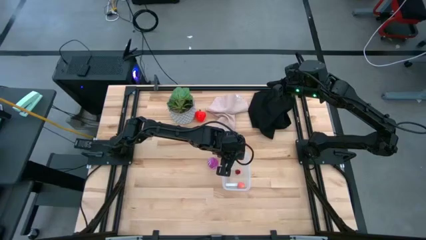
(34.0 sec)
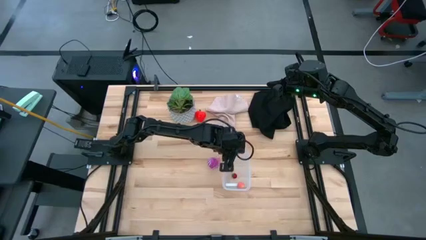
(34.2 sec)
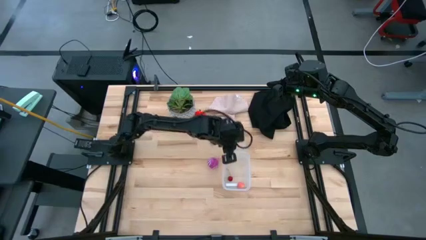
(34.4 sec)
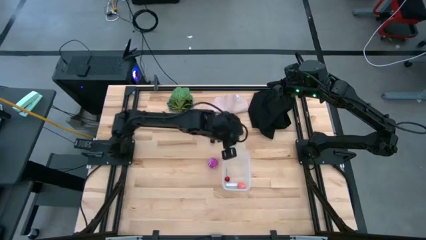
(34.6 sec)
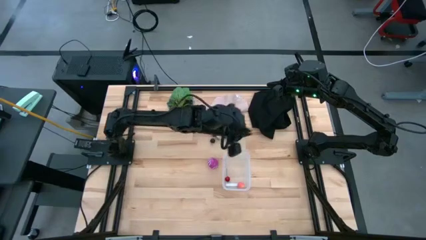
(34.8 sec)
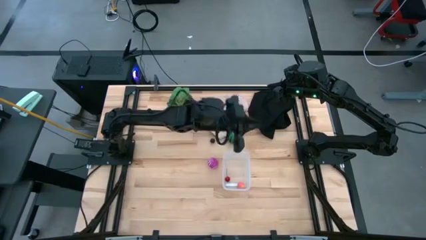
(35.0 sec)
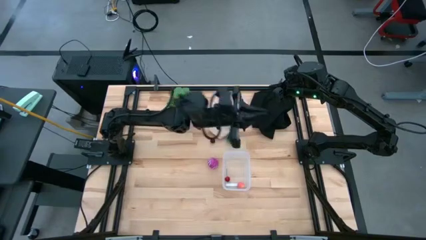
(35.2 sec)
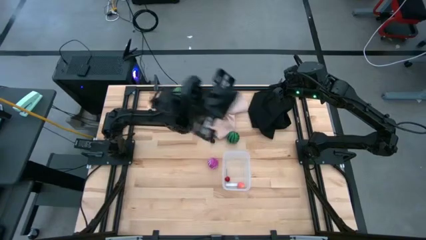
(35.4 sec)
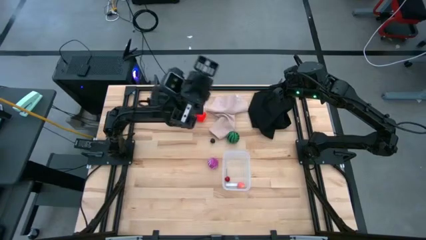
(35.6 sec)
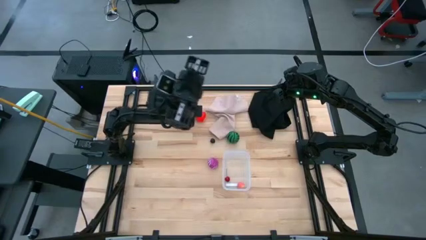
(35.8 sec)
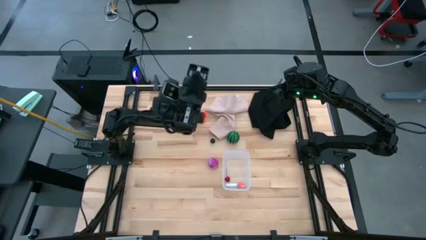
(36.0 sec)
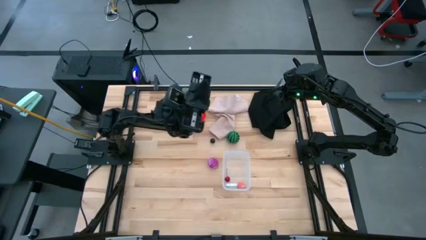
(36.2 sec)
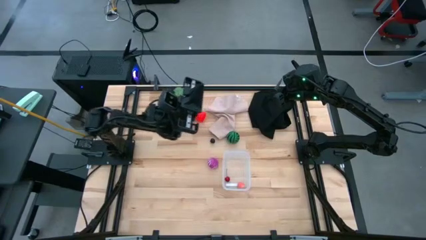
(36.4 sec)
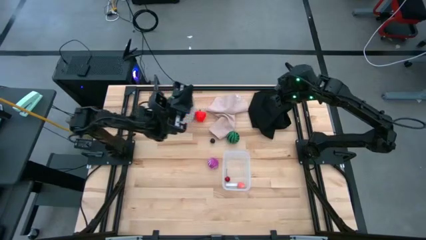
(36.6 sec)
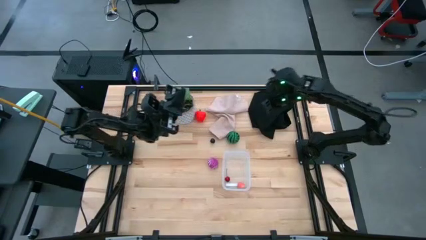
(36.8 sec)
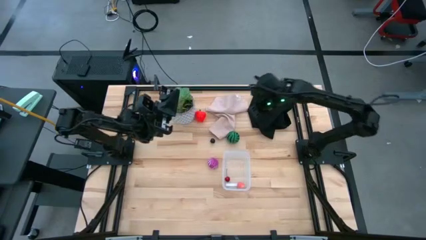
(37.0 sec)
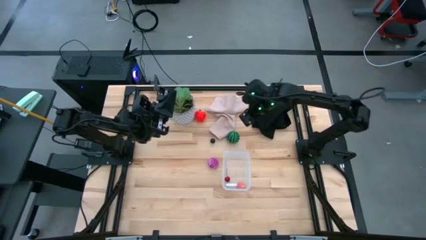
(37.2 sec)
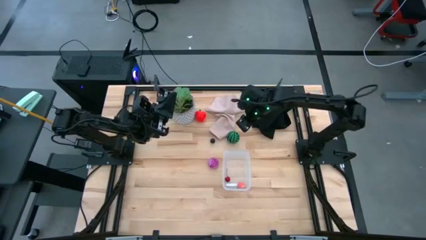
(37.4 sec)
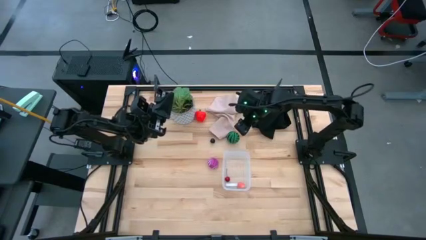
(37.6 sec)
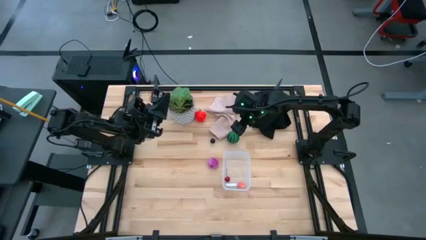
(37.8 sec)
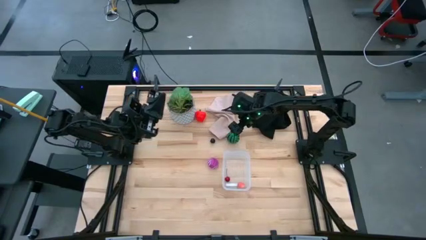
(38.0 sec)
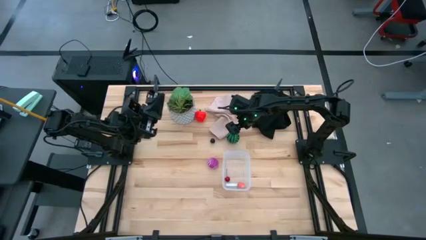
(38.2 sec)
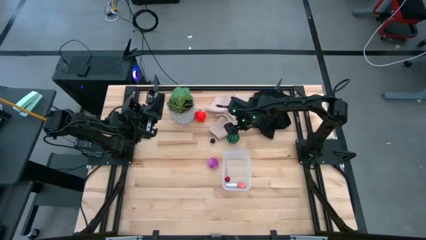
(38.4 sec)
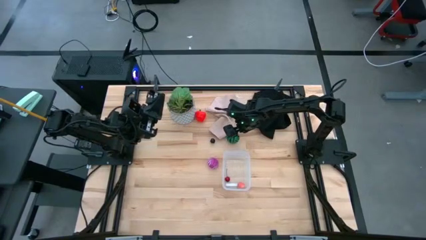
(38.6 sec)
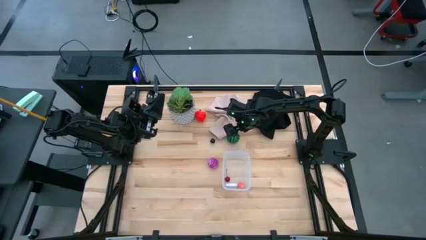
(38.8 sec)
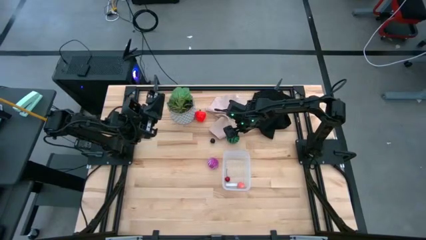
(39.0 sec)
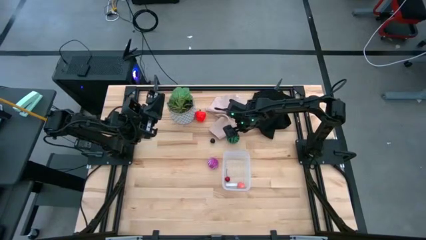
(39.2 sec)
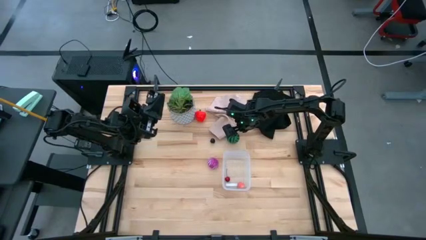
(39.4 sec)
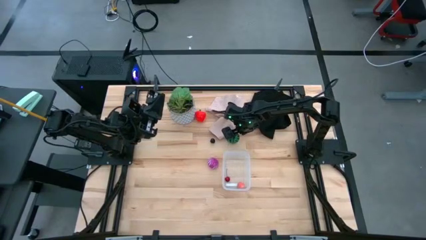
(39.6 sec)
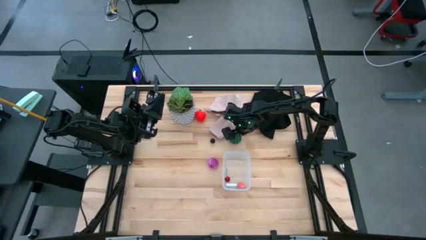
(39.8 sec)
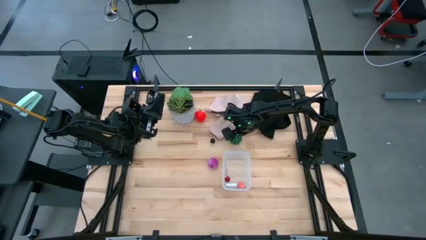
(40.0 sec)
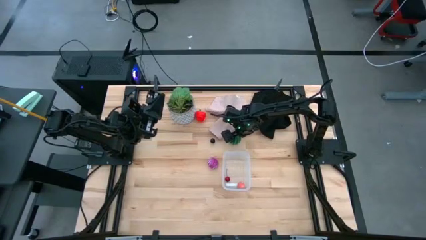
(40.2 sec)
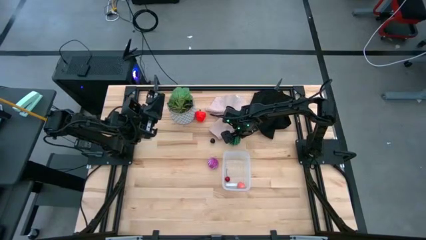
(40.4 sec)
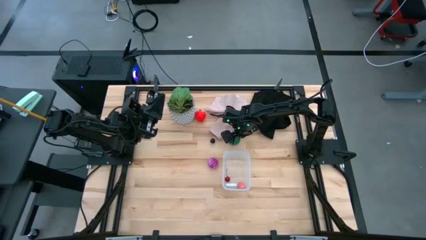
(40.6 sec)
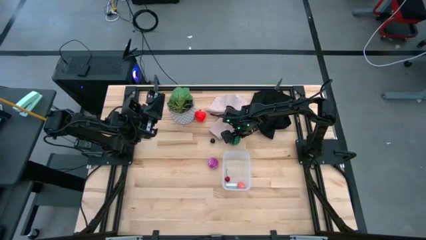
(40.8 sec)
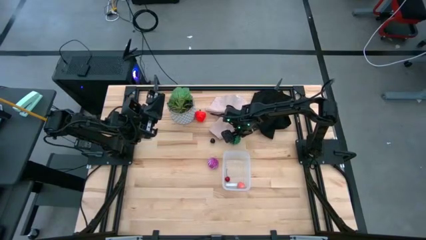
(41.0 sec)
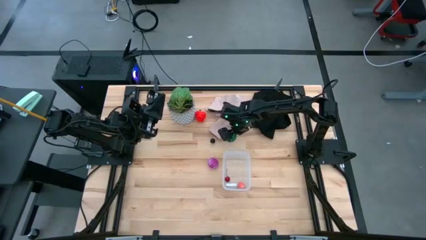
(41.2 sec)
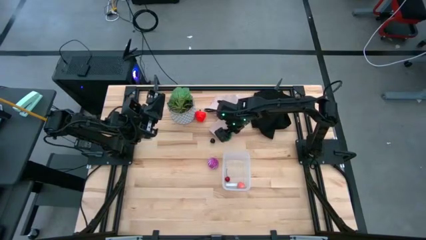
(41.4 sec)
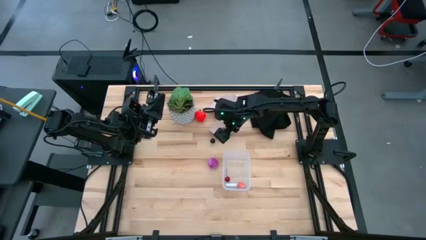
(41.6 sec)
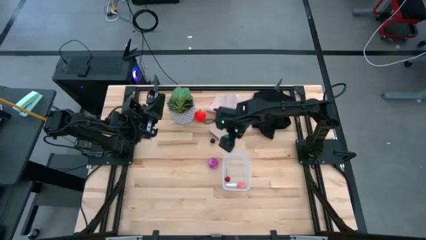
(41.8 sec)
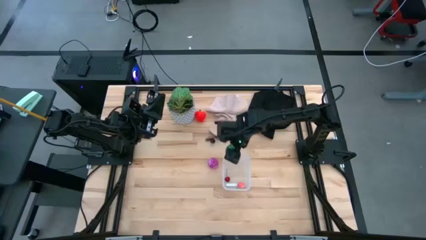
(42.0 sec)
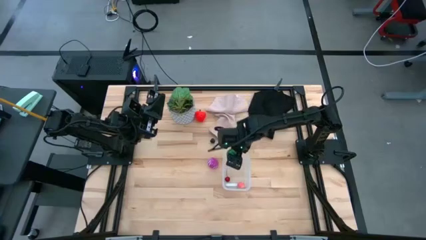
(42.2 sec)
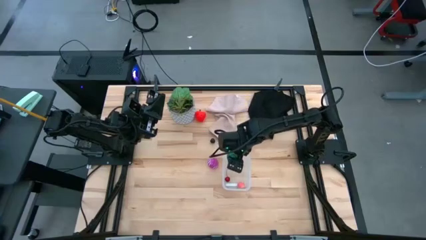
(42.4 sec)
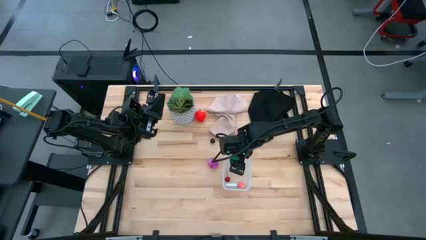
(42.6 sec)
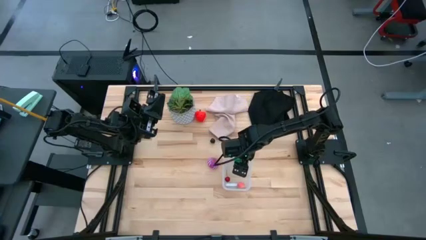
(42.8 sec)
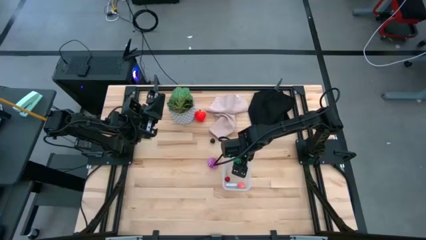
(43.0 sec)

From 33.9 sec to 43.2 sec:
Task: Pick and placing Produce into tupperware
Put the green watermelon into the transparent bin

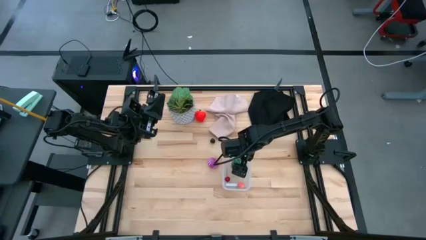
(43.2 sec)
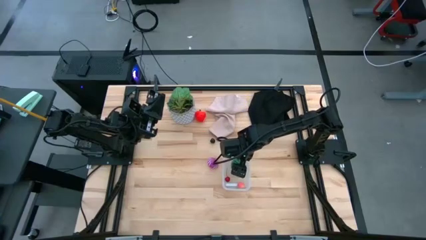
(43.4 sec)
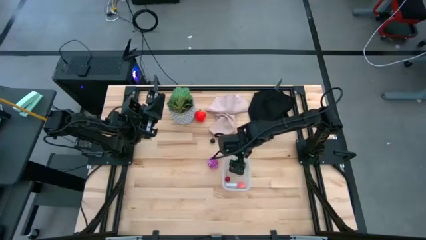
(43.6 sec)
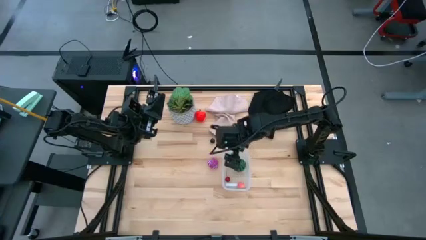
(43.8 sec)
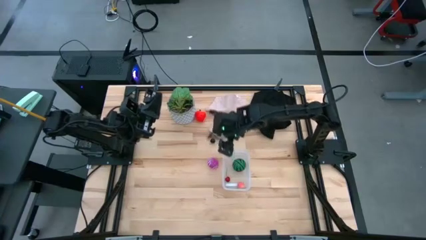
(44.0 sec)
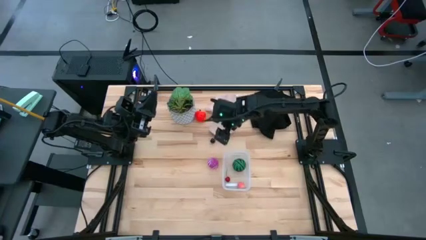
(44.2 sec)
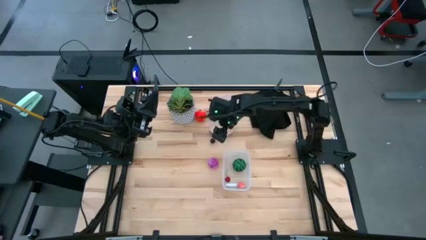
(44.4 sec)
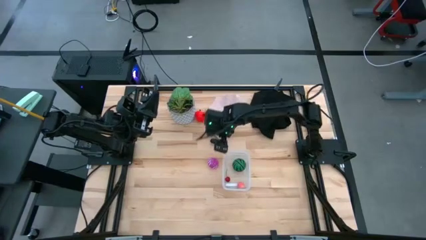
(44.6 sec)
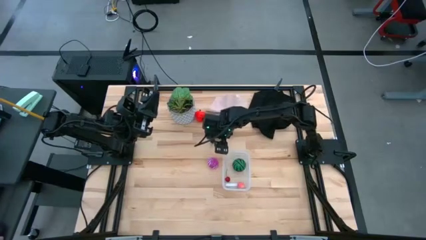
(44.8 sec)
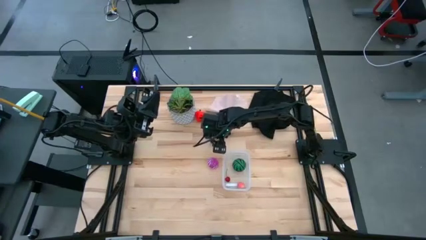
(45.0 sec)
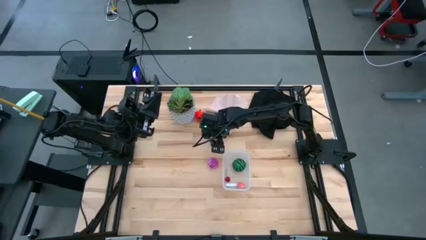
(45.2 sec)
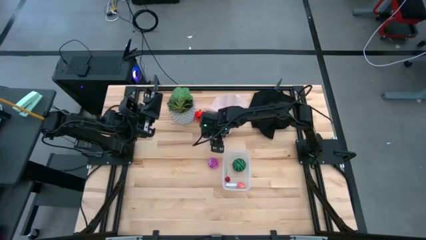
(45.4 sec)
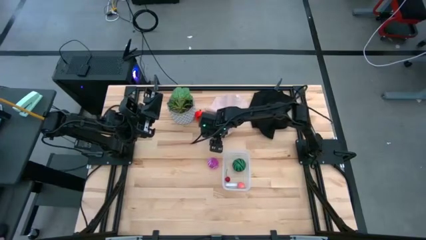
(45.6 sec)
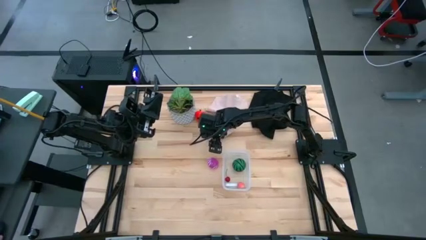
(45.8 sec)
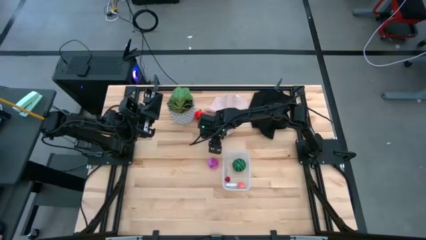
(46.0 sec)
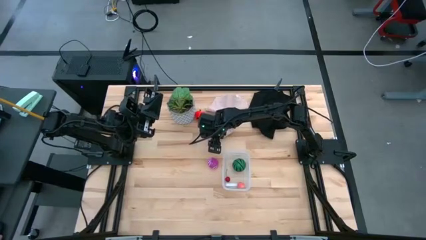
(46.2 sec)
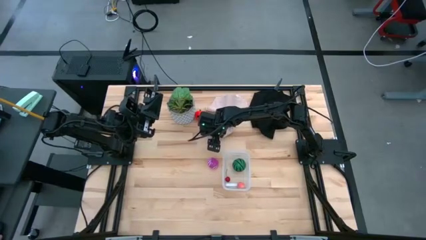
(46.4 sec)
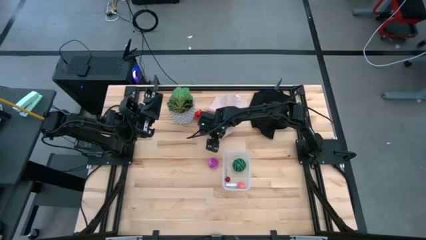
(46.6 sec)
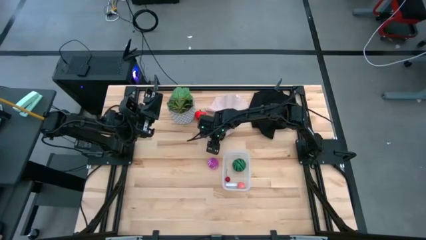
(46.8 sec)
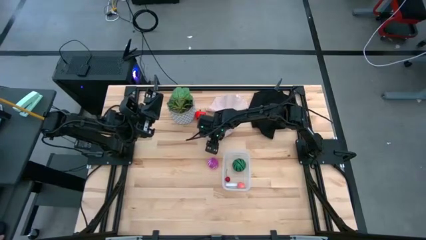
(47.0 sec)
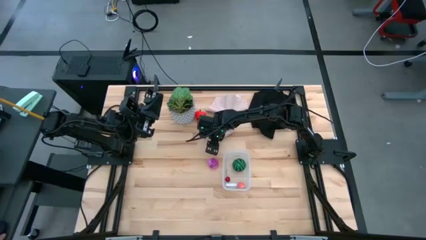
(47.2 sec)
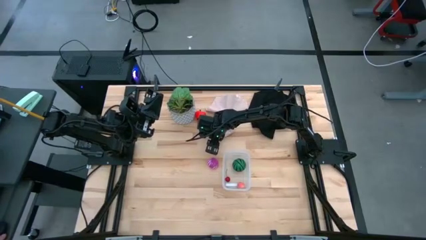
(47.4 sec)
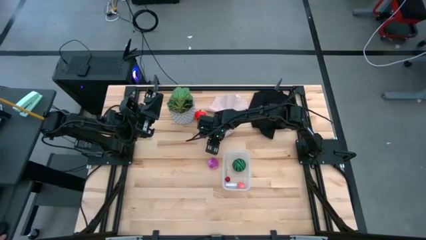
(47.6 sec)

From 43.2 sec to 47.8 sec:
Put the black plum into the transparent bin
